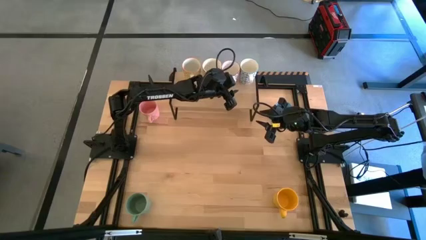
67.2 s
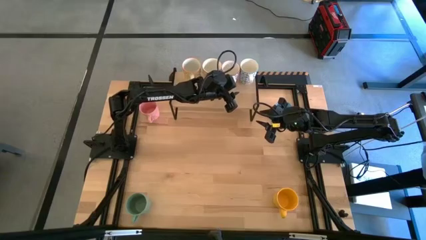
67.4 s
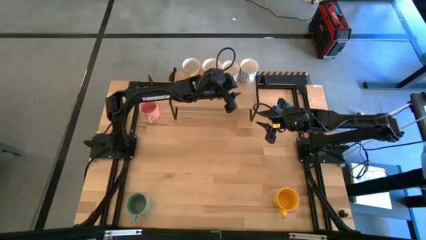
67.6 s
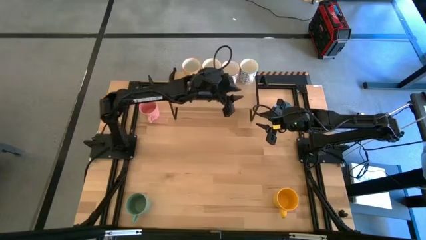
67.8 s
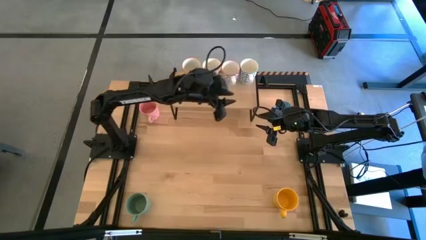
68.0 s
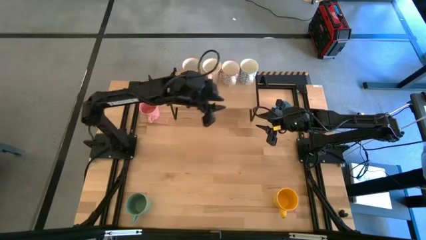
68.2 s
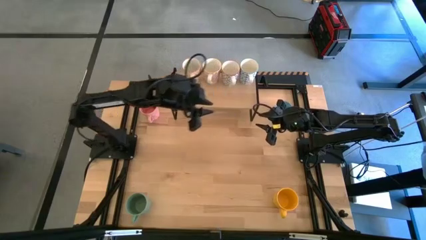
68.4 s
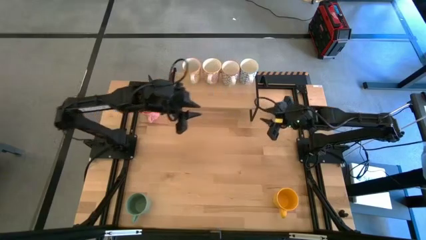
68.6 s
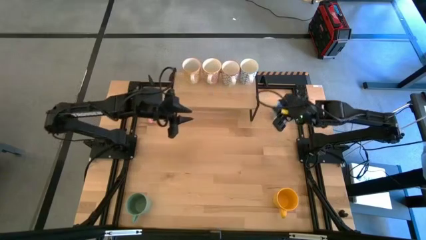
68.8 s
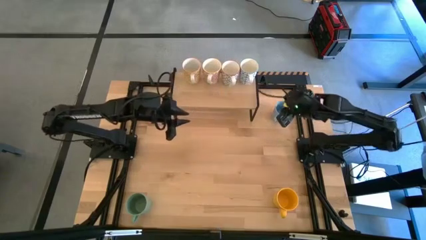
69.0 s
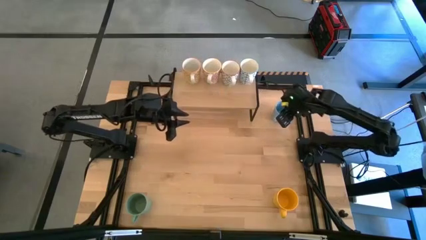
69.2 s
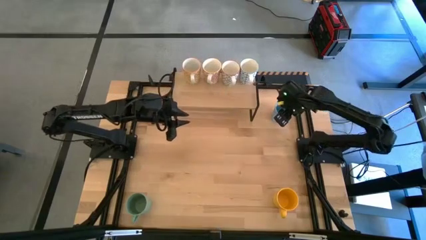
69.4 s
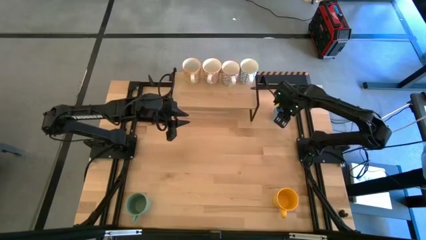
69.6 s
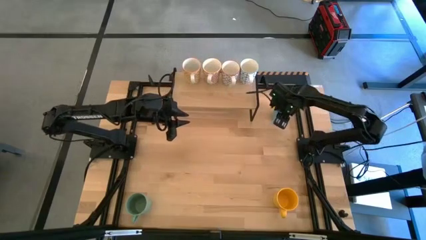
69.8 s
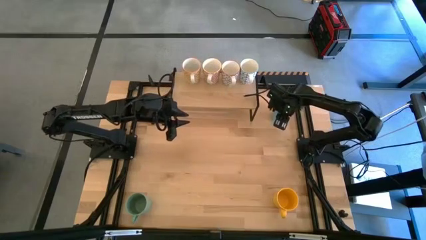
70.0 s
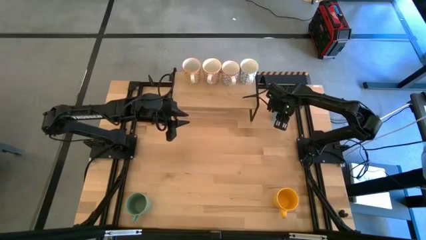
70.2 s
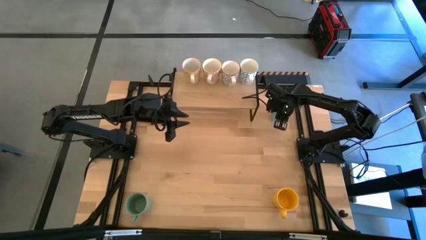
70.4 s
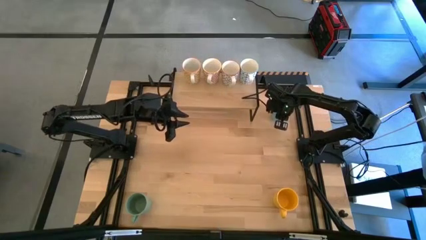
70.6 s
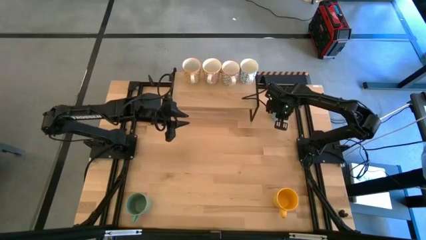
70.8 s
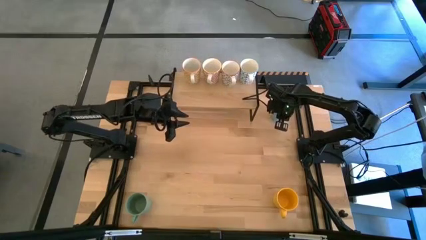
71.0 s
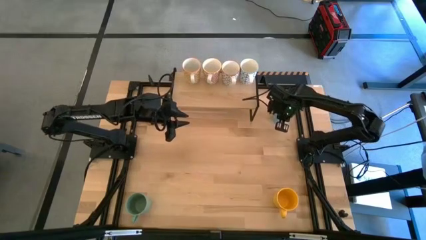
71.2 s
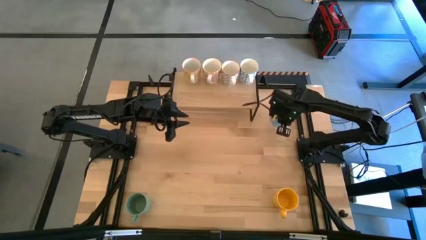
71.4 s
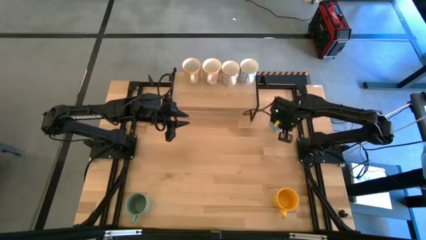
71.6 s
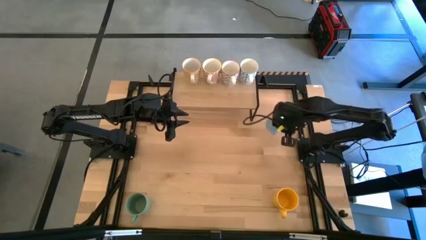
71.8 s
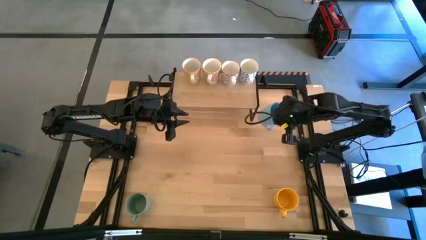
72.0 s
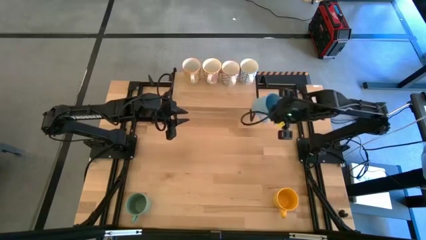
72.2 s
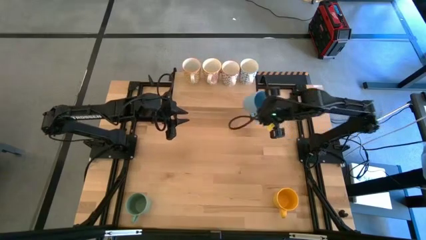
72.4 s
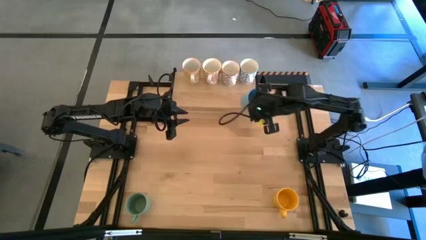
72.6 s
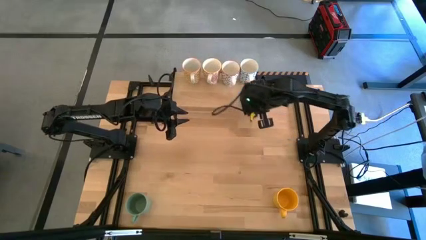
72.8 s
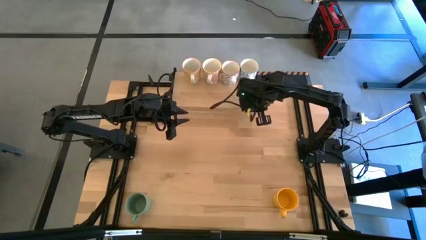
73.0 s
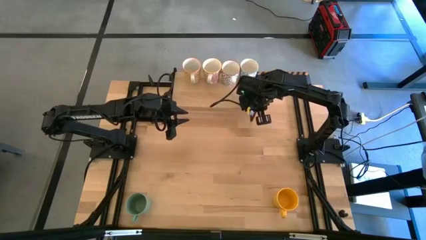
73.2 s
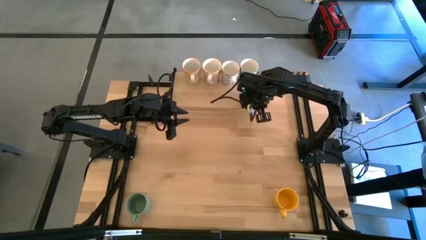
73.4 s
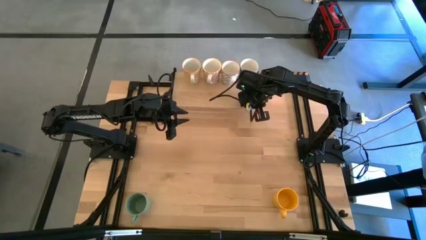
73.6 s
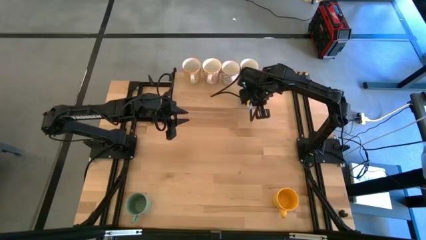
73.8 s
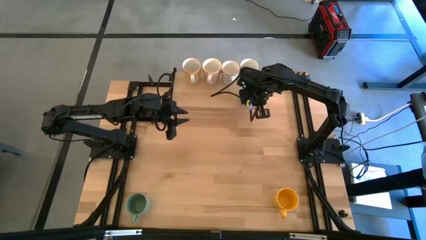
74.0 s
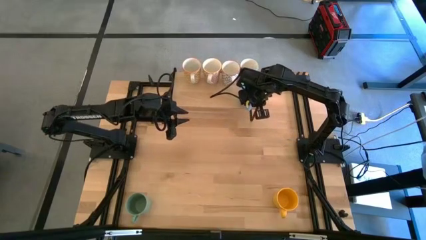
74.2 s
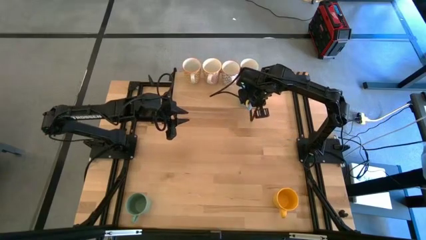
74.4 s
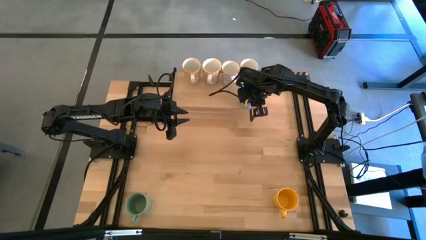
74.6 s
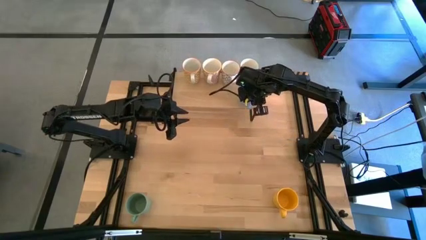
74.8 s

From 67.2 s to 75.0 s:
Task: Place coffee mugs
Put the blue mug on the shelf

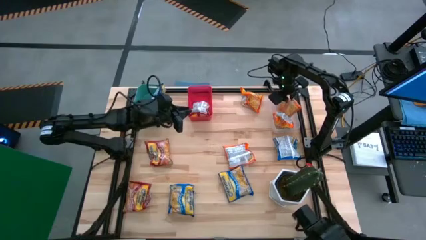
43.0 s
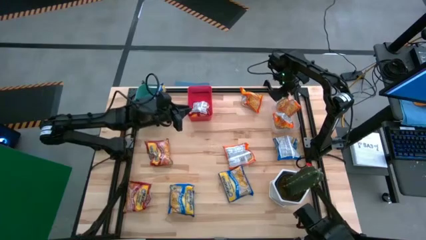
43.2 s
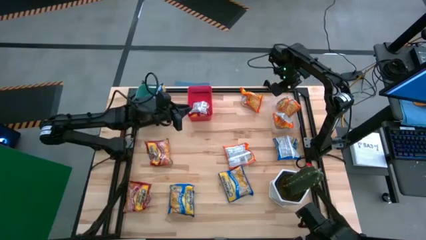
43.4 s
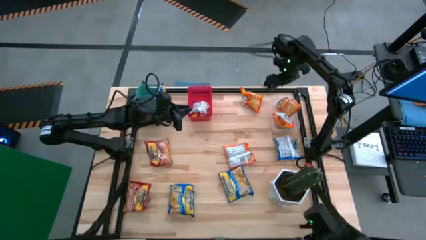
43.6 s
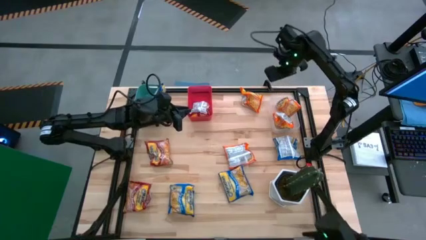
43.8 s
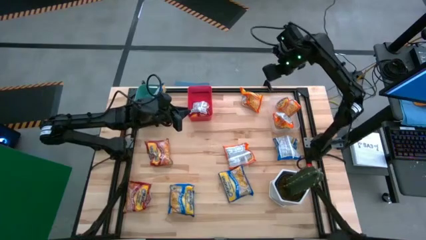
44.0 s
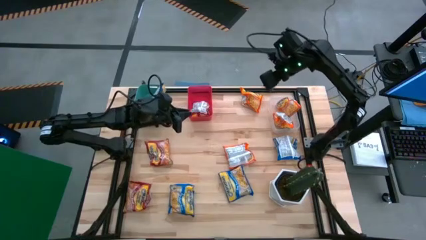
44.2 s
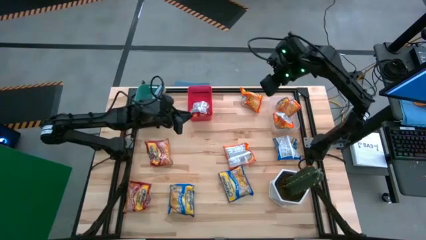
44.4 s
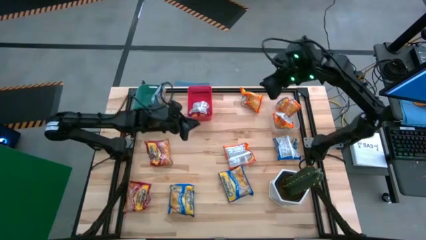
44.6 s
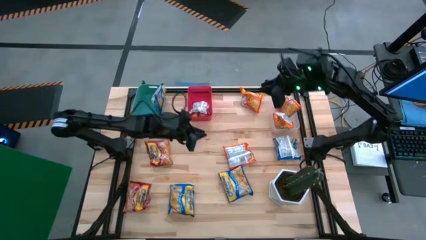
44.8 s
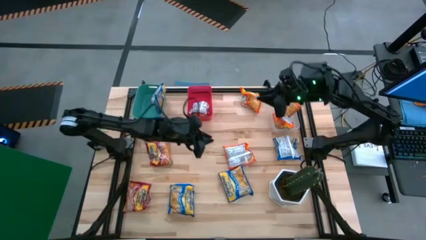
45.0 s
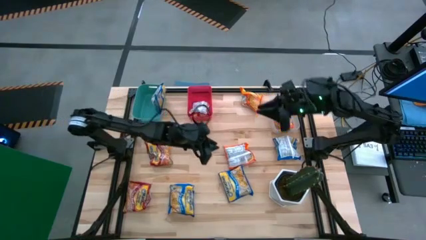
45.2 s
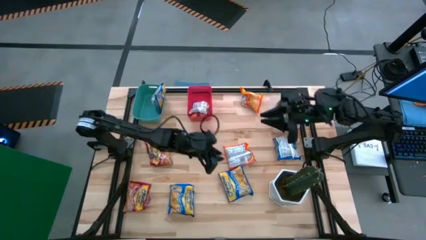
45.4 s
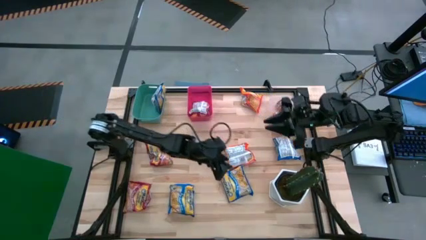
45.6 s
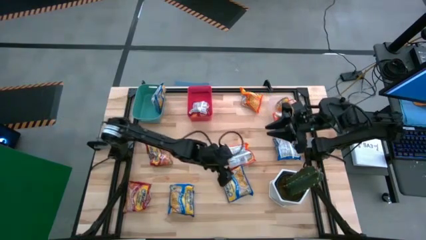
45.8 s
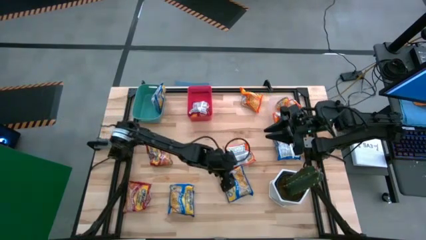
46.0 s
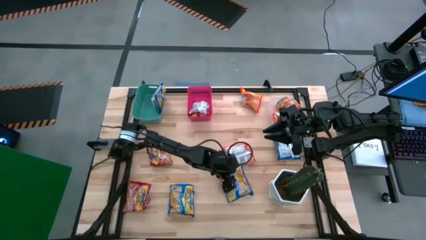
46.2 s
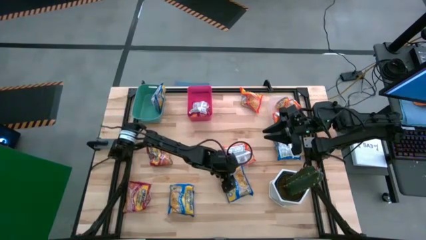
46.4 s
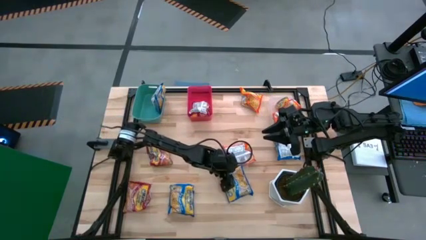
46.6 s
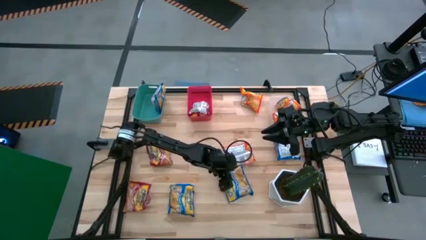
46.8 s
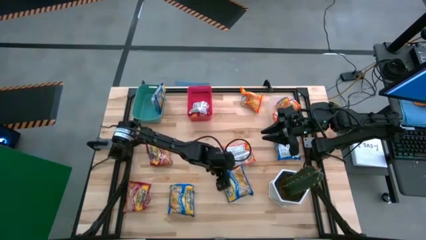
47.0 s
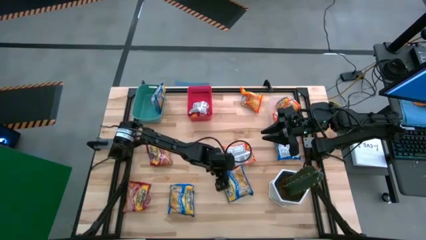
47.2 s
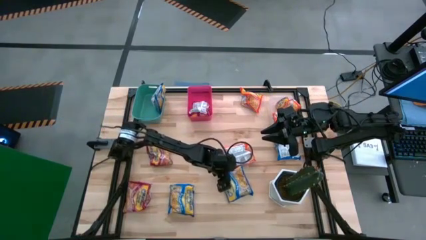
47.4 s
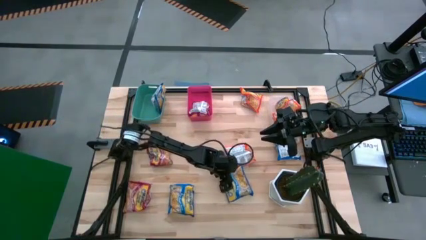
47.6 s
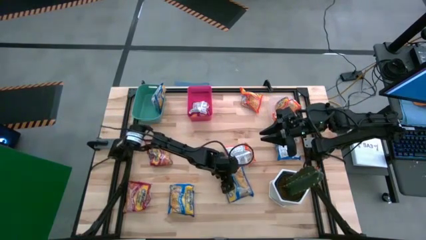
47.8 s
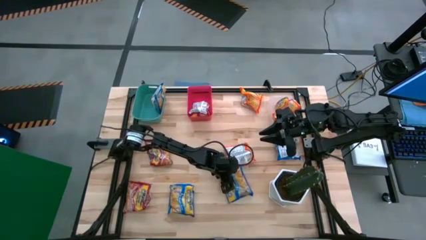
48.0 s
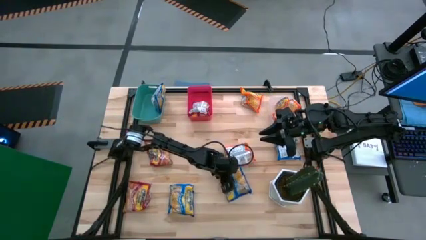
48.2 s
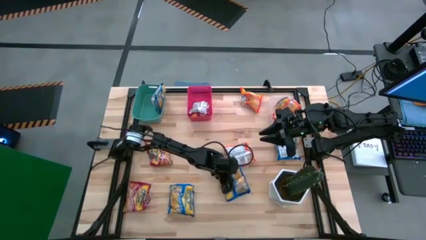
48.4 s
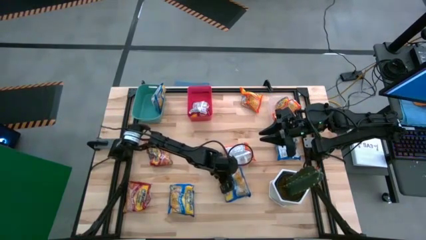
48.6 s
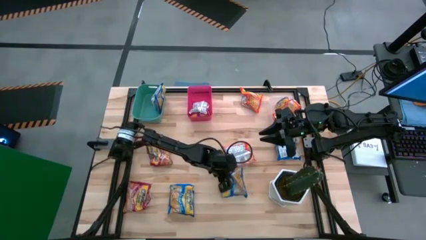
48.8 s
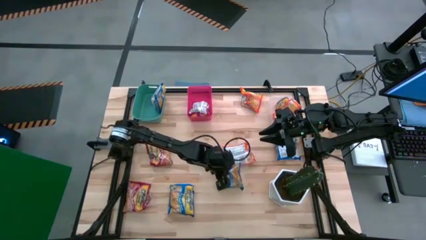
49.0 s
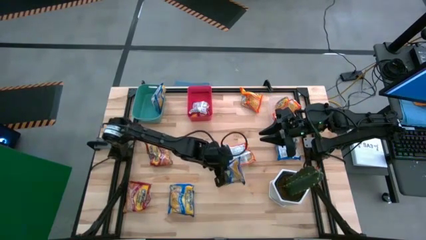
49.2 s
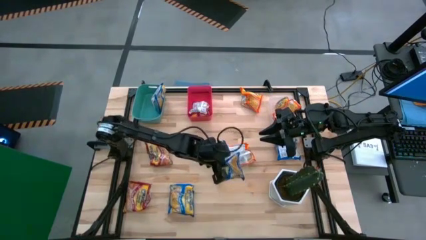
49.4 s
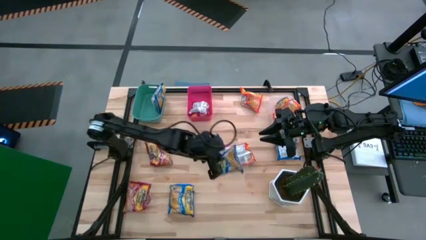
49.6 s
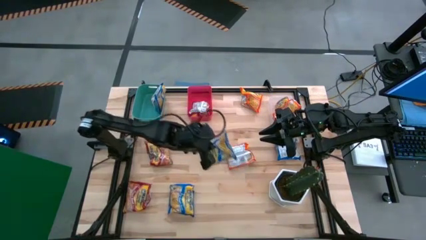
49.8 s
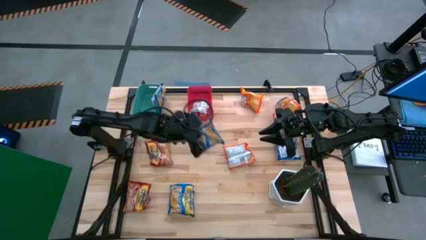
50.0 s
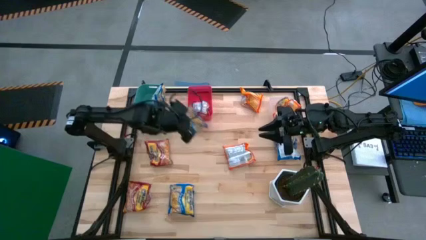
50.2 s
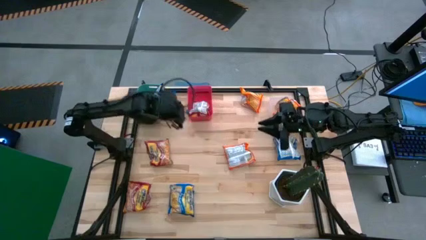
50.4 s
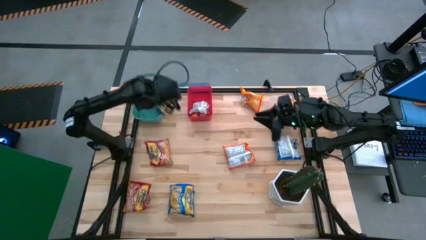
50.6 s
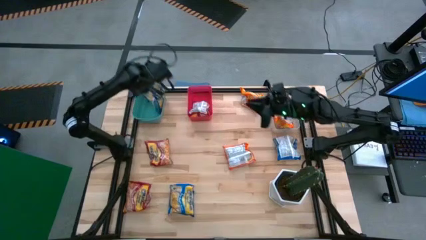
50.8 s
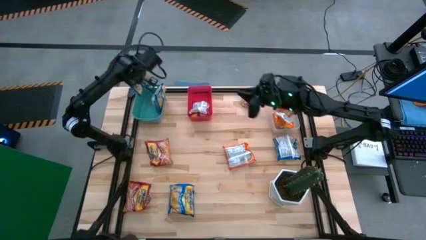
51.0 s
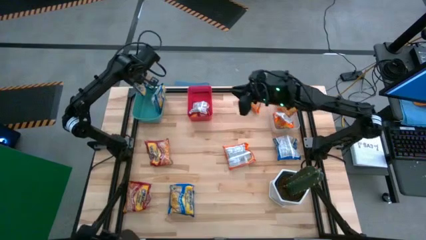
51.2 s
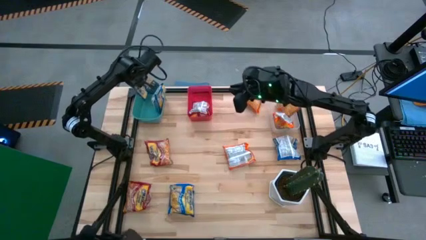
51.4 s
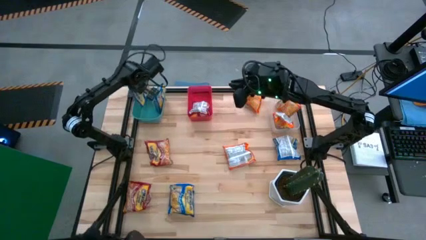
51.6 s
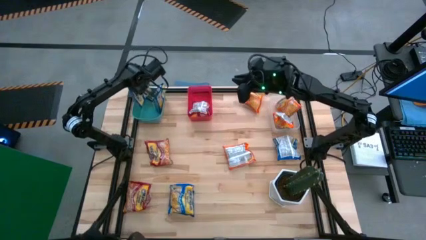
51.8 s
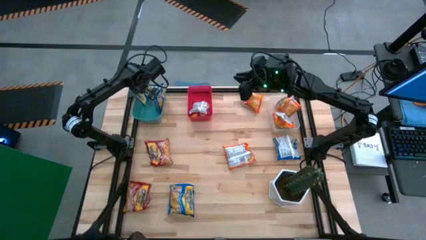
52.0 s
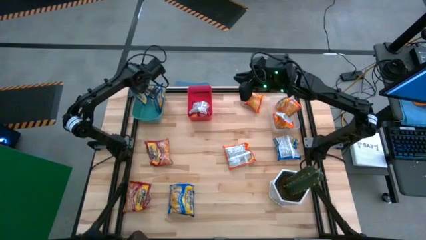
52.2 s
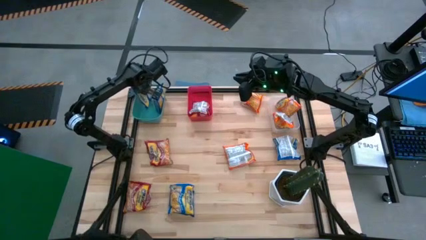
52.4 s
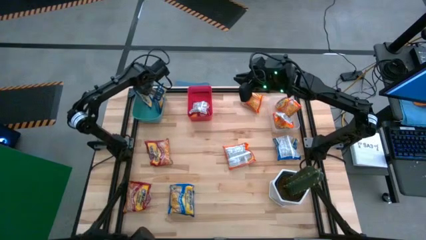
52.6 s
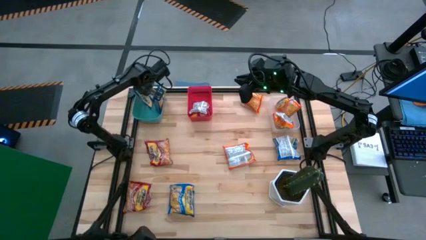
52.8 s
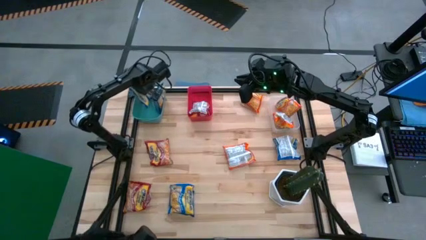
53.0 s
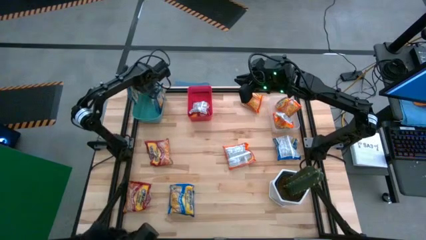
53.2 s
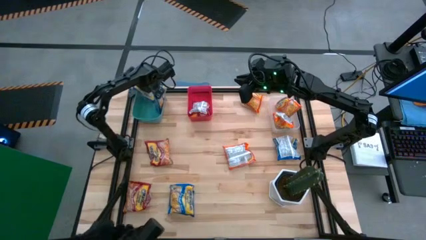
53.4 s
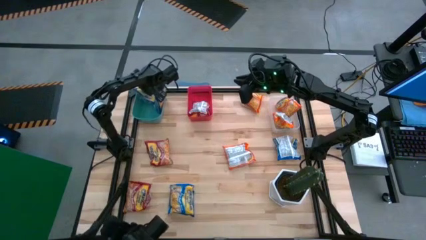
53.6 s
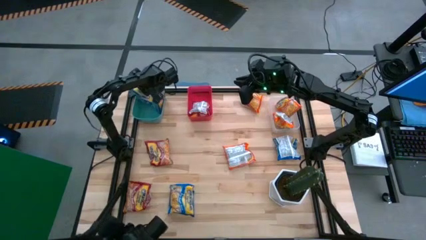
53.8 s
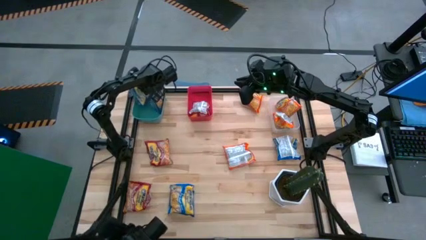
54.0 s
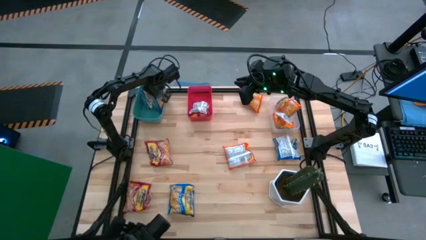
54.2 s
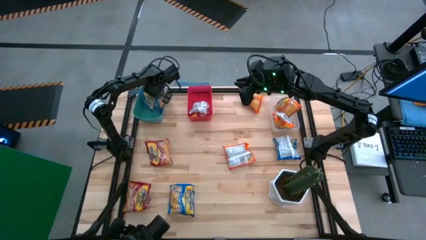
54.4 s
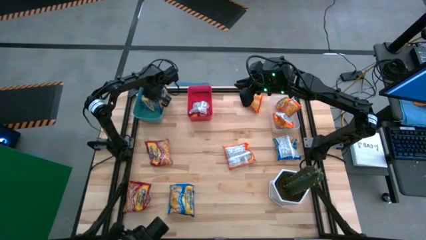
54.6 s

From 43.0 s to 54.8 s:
Task: Sort Maruchan noodles
Put the blue noodle pack into the green bin
